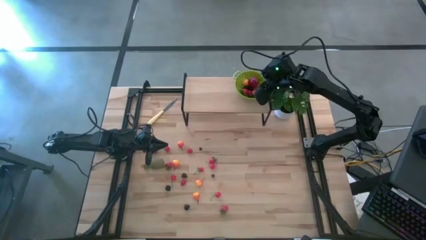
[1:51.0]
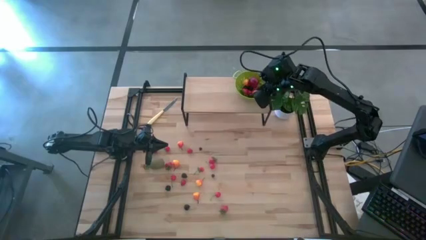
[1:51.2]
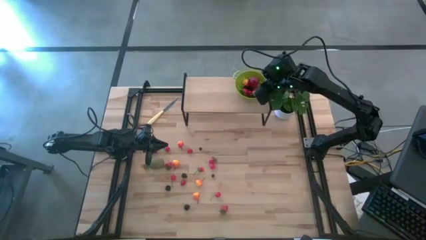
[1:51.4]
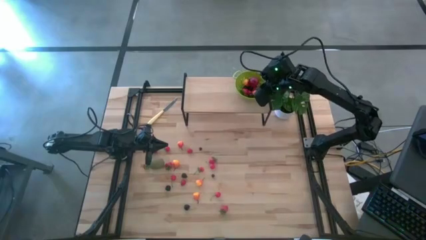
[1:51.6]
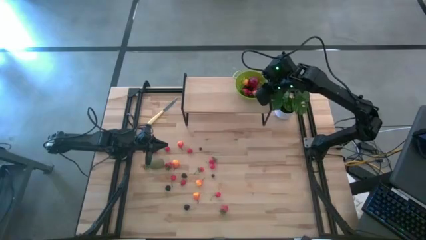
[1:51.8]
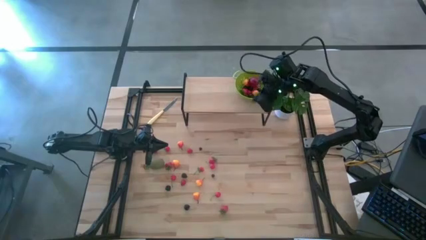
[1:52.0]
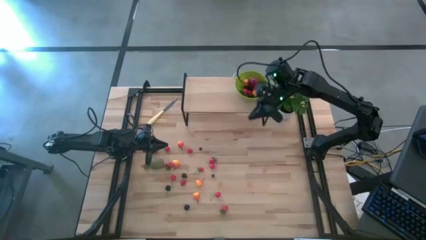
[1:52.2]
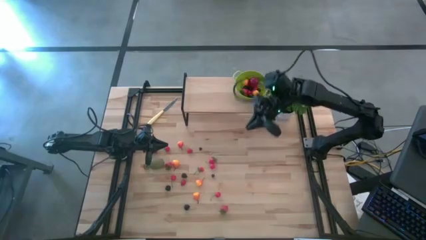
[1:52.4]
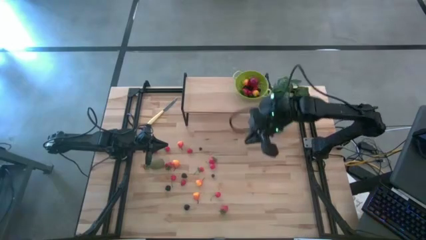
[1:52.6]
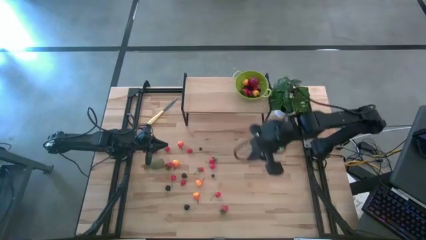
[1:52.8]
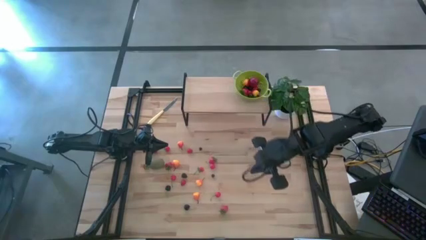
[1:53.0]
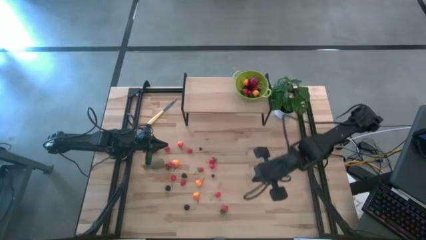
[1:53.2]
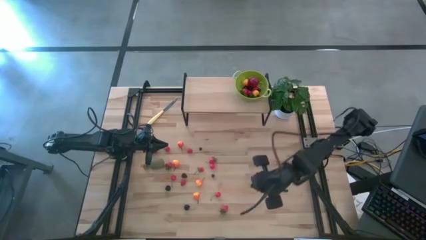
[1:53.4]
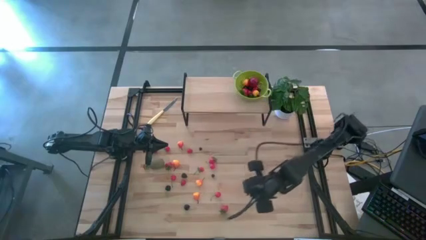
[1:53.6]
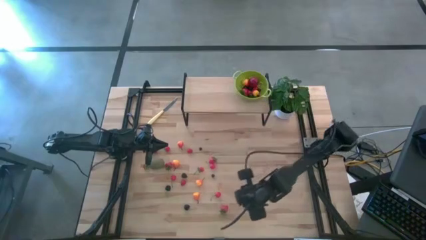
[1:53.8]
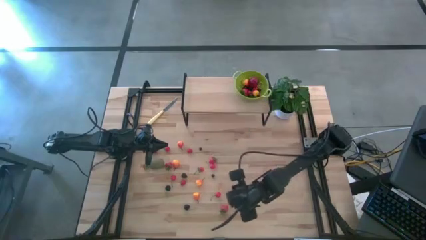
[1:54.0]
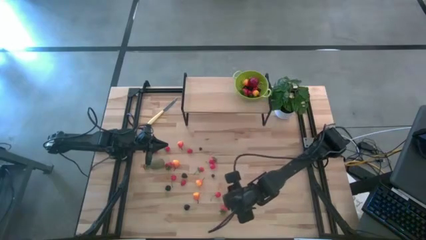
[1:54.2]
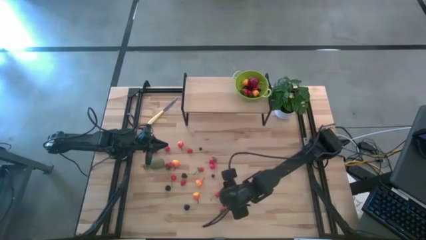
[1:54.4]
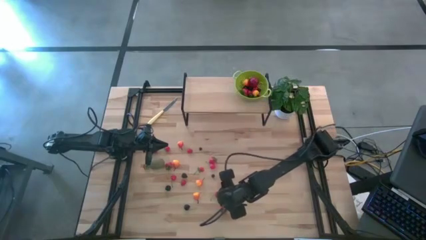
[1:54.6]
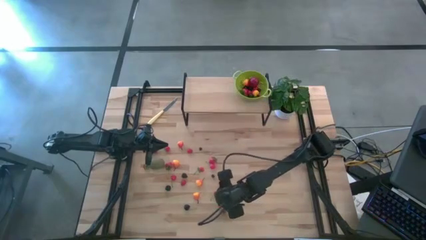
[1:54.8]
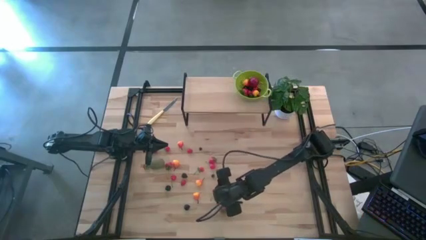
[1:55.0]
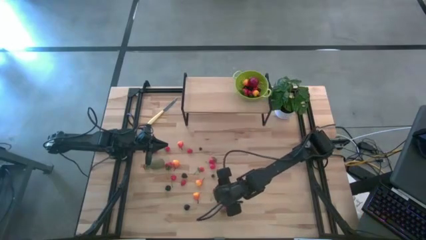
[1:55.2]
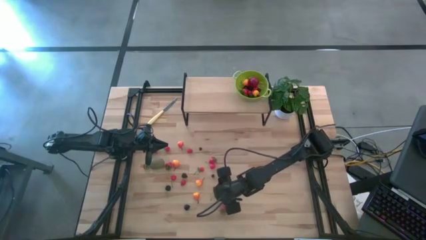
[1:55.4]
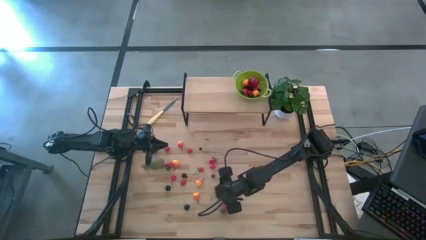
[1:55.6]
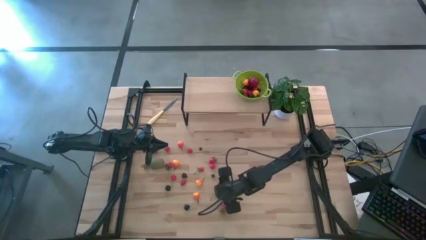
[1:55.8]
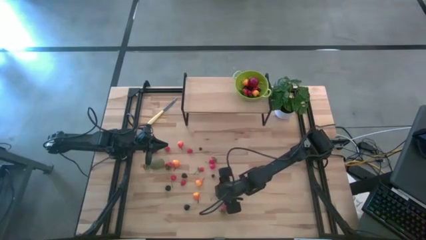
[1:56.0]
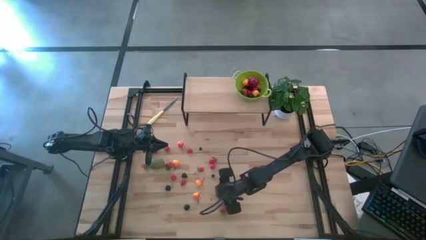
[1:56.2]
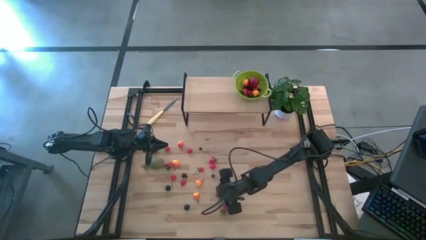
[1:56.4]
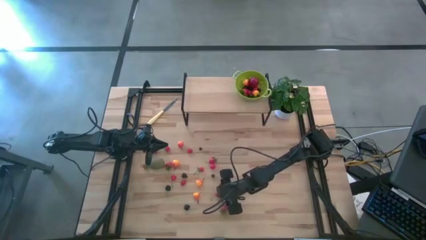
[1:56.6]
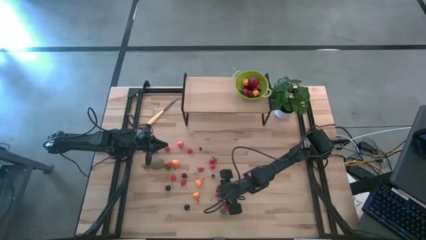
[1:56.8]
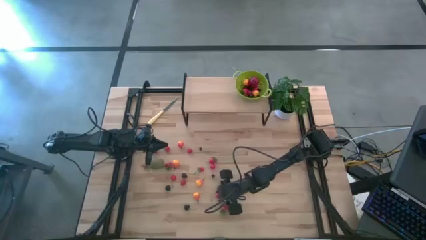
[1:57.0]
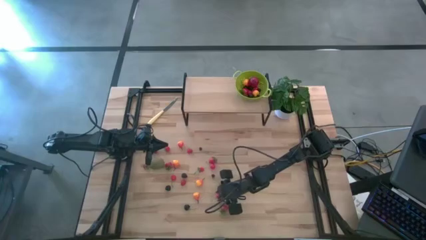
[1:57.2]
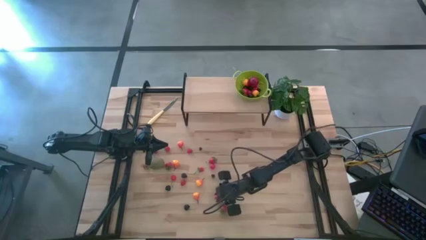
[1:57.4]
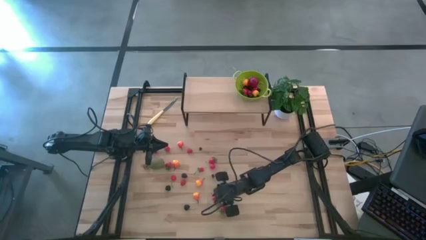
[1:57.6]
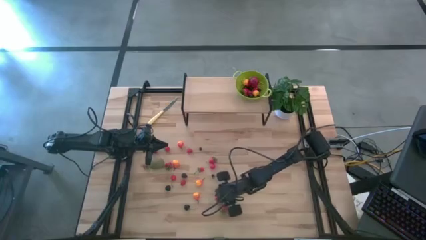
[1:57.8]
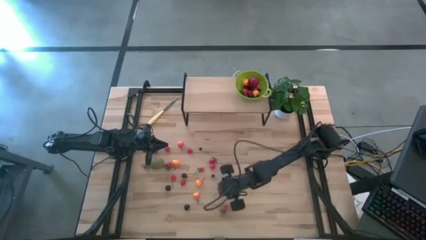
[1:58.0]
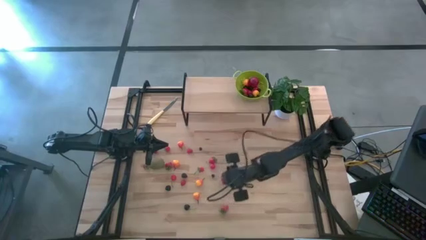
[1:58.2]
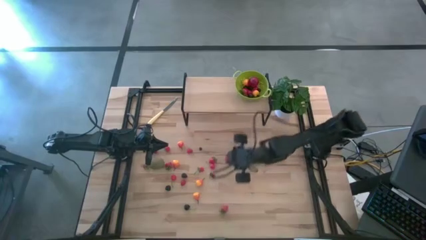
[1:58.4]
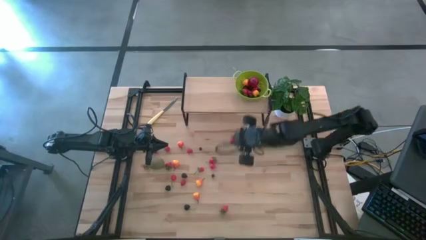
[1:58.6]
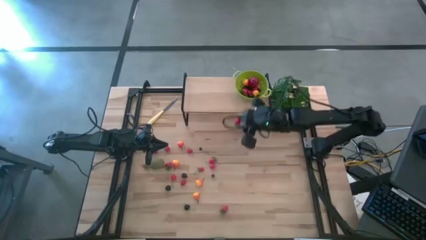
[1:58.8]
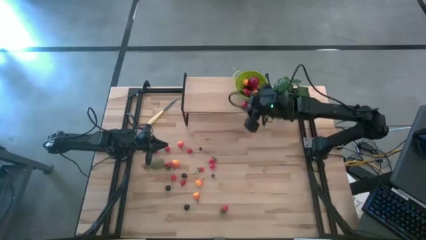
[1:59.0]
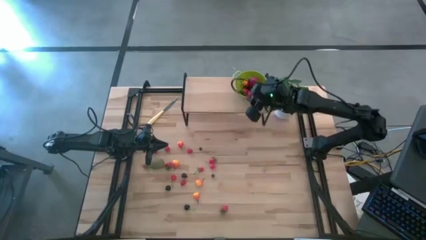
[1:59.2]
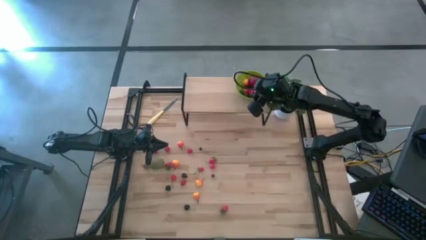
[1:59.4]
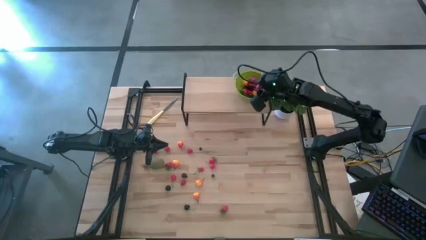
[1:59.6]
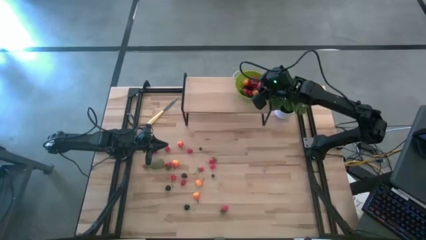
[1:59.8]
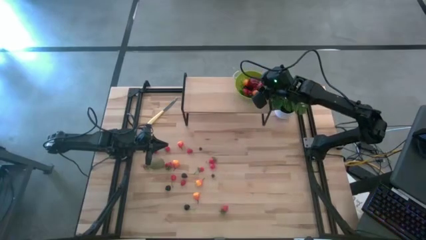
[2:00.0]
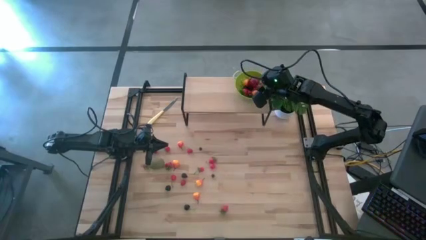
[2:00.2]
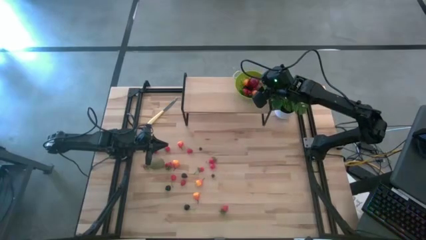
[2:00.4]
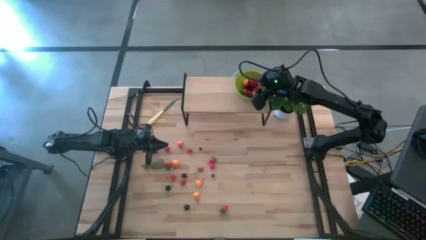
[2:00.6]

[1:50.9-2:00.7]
Task: Build produce basket
Put the red cherry into the green basket

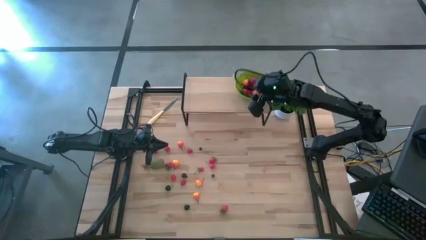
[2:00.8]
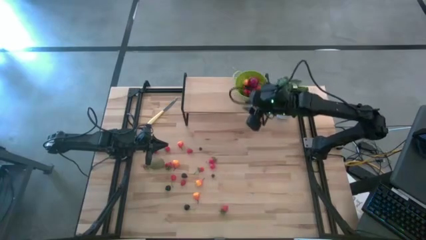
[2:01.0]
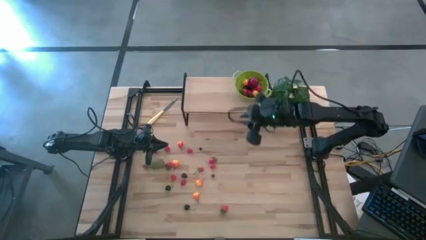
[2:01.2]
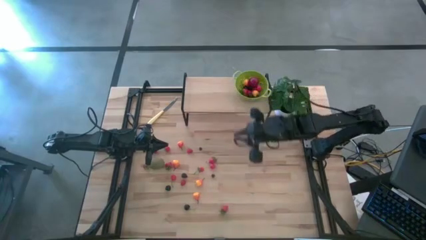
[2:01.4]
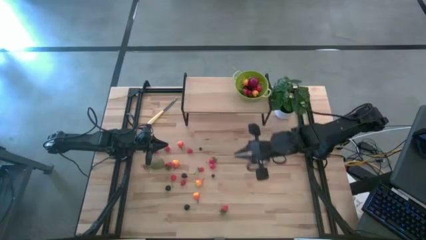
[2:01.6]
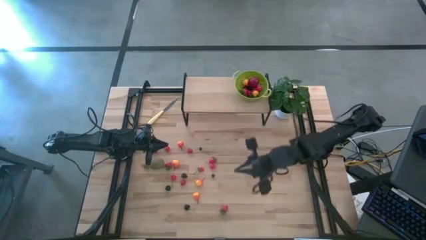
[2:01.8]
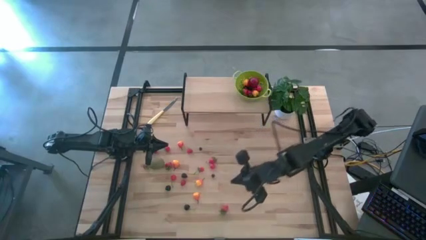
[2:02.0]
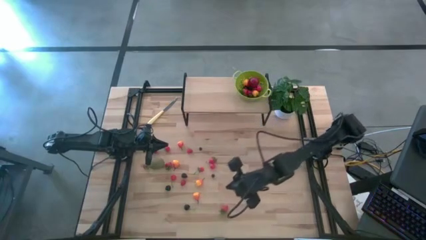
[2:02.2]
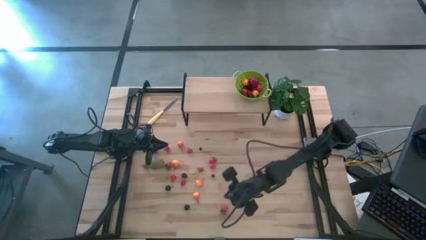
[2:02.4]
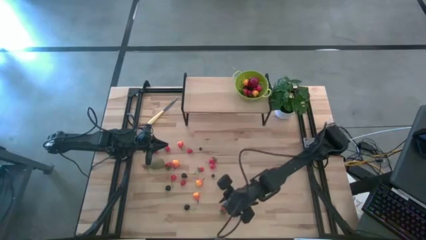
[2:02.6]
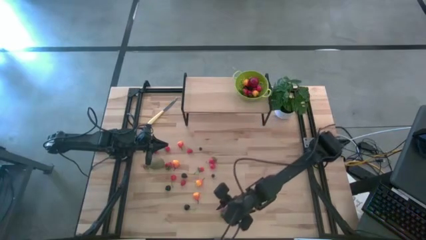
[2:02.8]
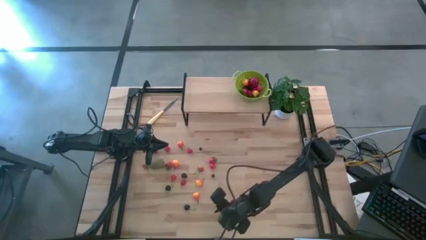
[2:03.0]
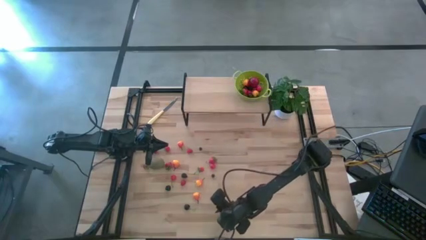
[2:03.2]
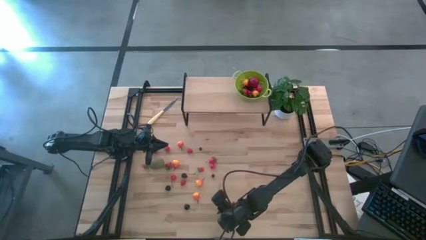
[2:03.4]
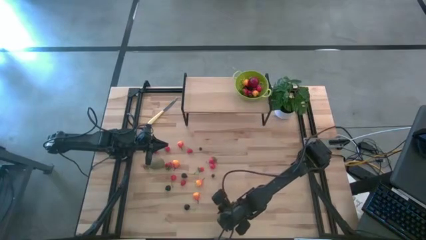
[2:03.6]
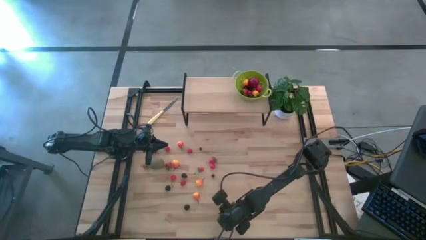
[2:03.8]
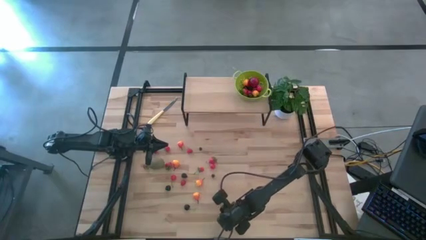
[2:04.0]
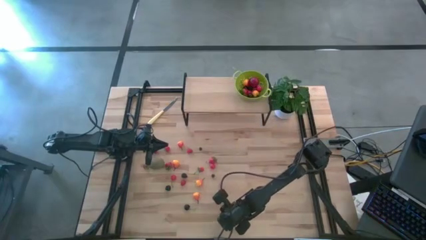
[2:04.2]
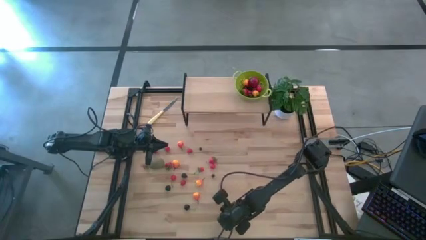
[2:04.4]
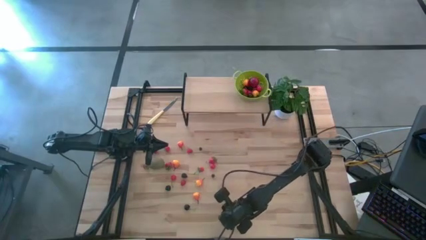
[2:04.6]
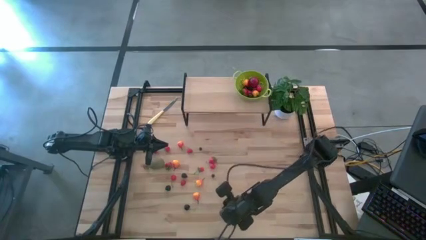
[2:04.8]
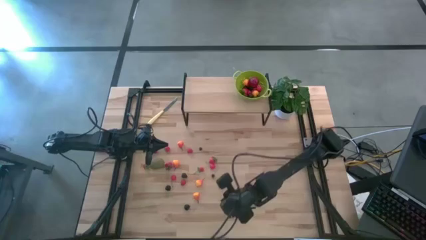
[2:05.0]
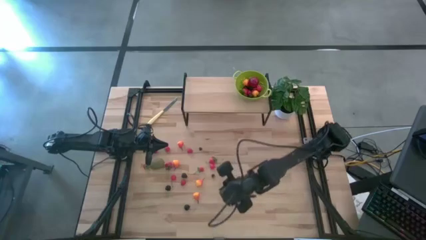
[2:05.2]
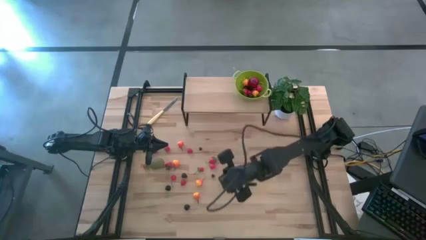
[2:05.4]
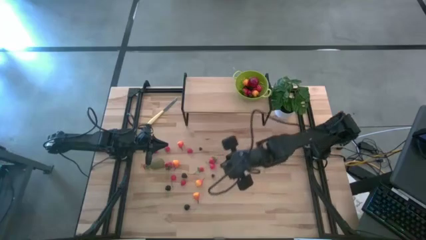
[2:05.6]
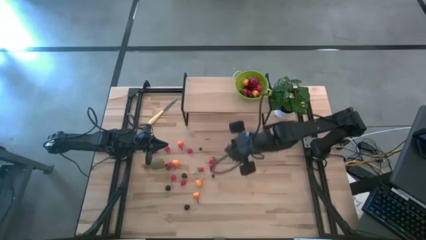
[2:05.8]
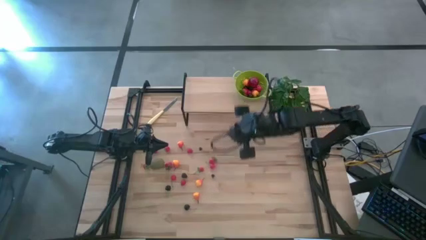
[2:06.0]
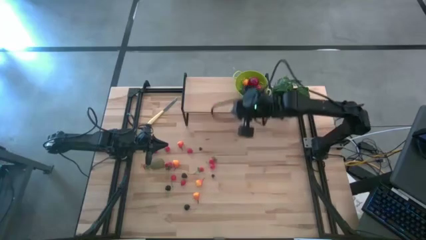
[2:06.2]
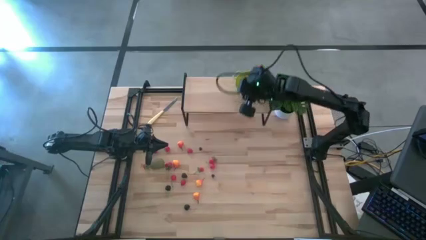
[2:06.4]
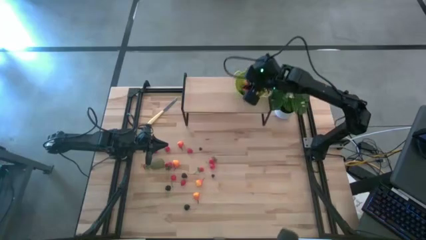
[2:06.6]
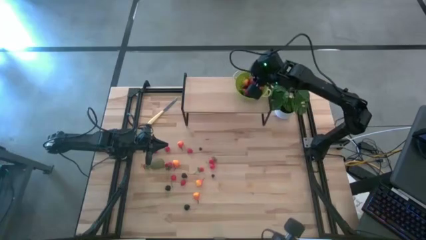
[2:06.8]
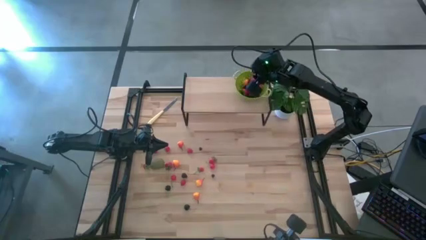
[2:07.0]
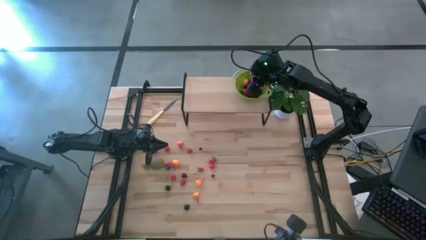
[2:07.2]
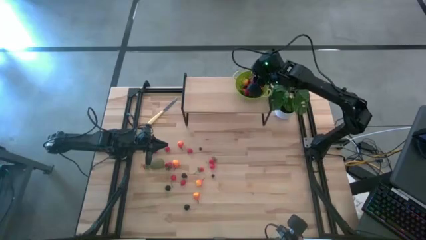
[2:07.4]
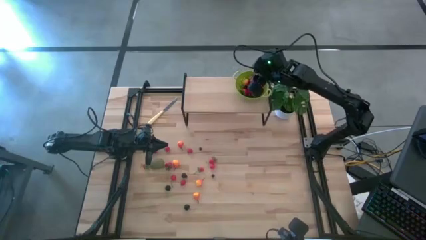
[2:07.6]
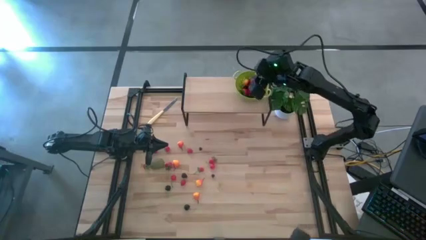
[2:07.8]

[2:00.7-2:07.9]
Put the strawberry into the green basket
